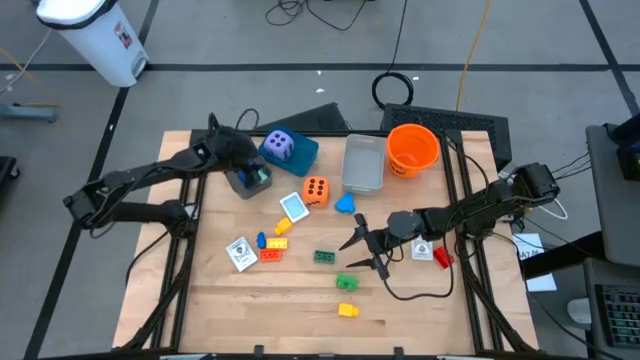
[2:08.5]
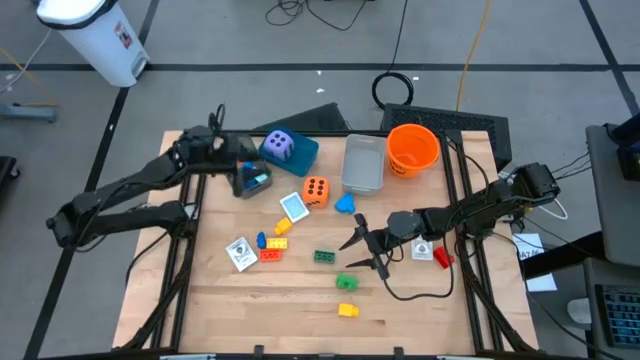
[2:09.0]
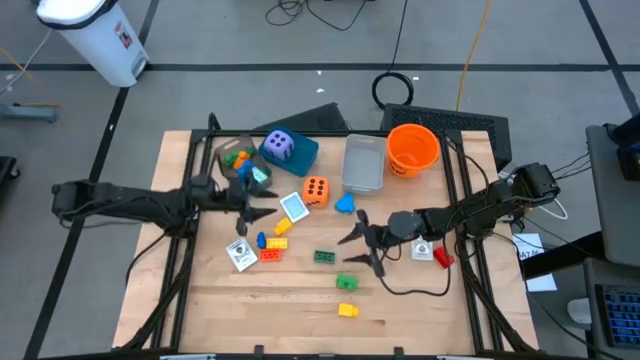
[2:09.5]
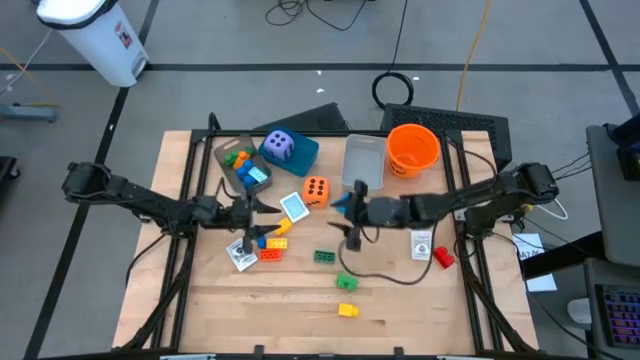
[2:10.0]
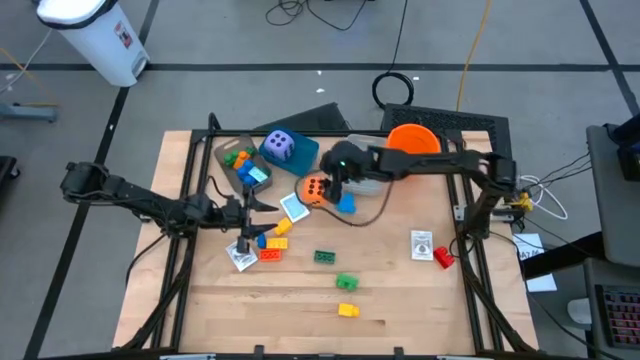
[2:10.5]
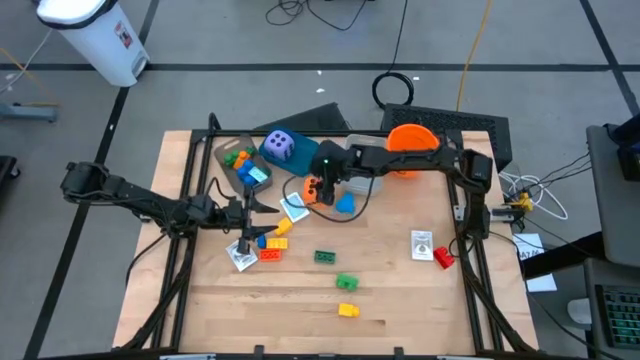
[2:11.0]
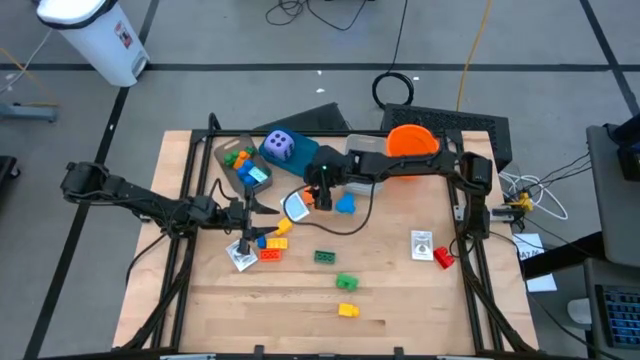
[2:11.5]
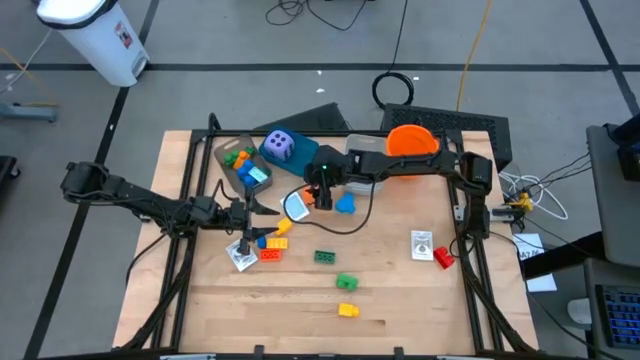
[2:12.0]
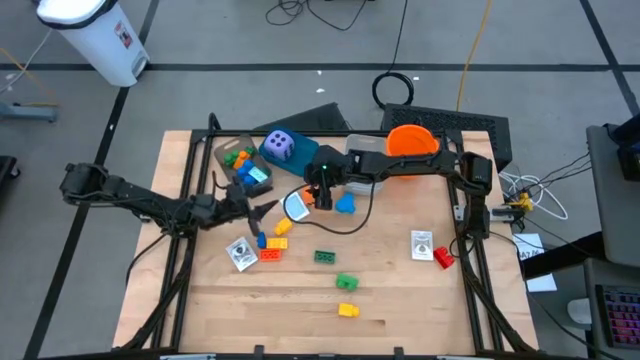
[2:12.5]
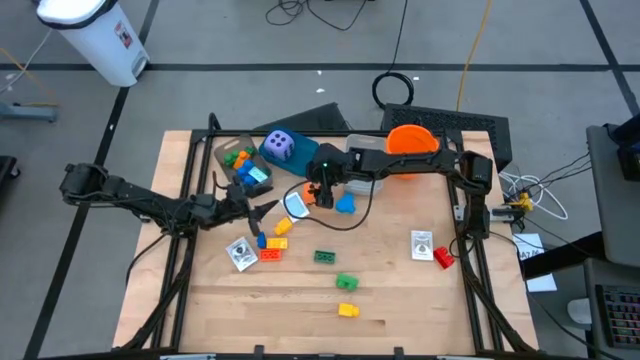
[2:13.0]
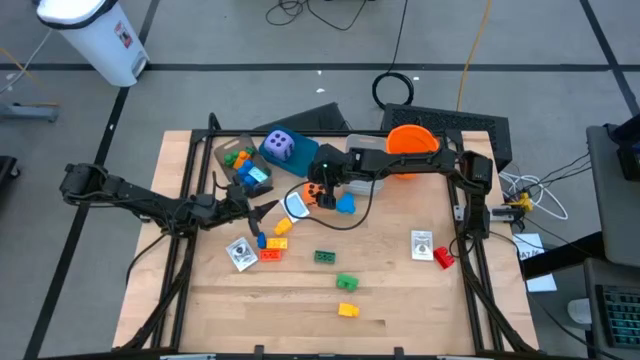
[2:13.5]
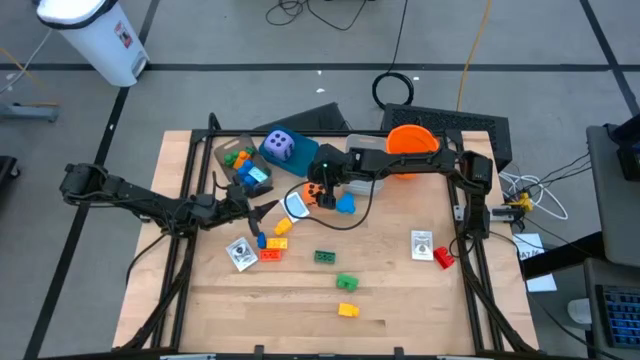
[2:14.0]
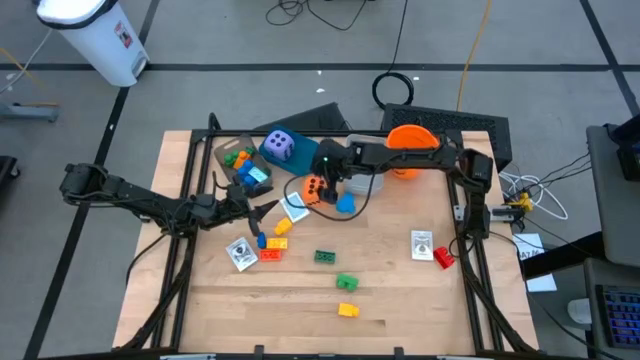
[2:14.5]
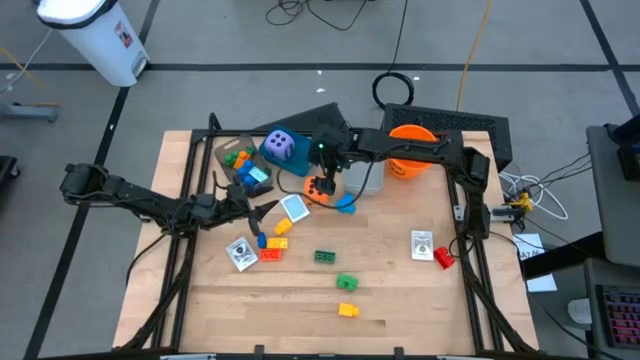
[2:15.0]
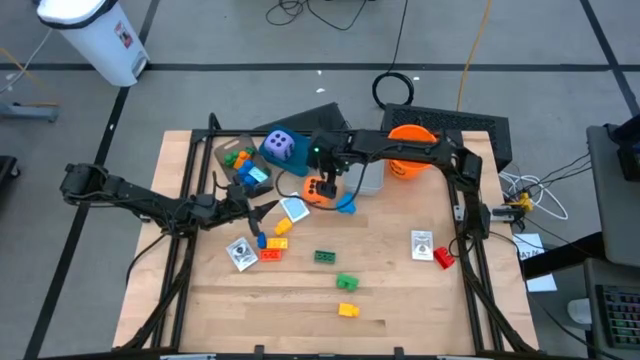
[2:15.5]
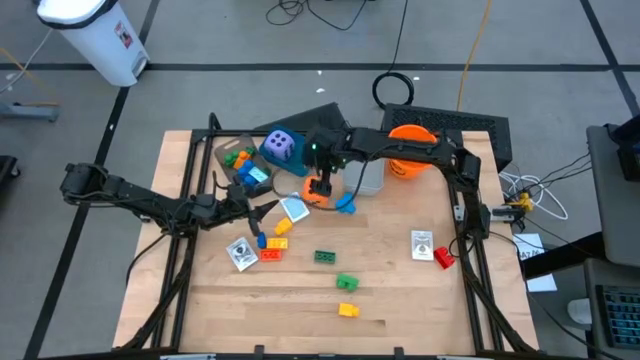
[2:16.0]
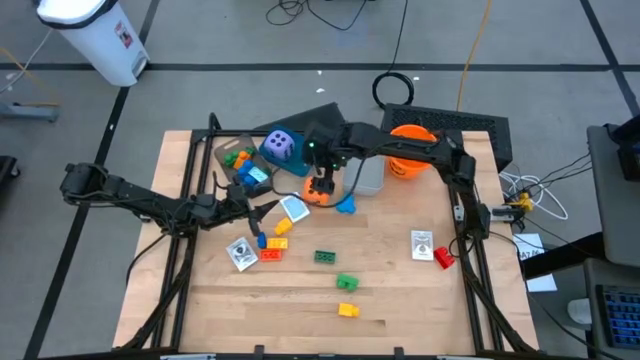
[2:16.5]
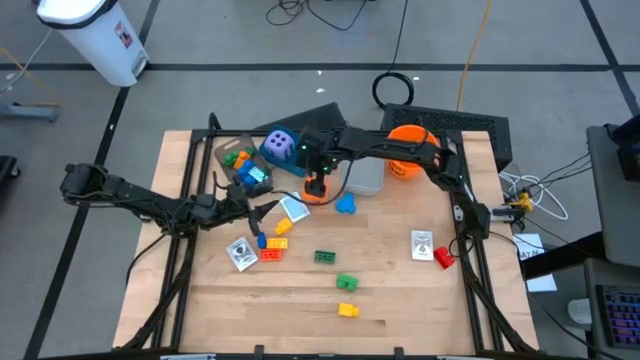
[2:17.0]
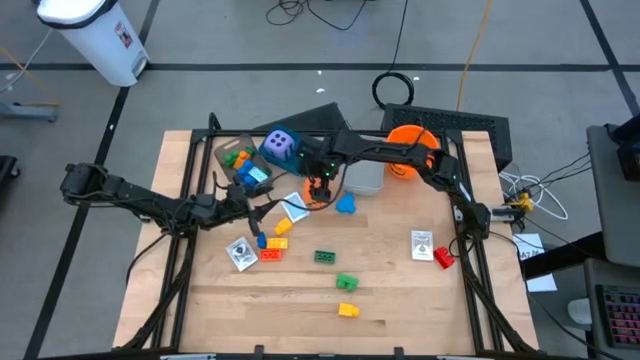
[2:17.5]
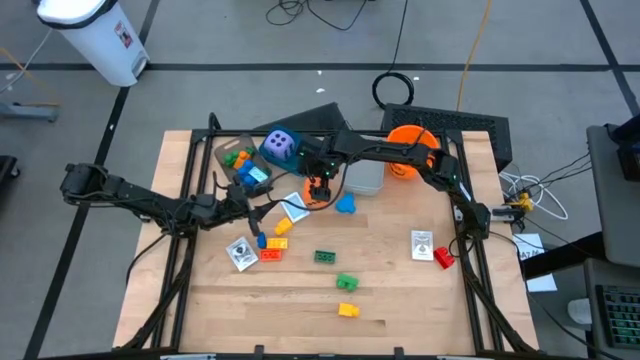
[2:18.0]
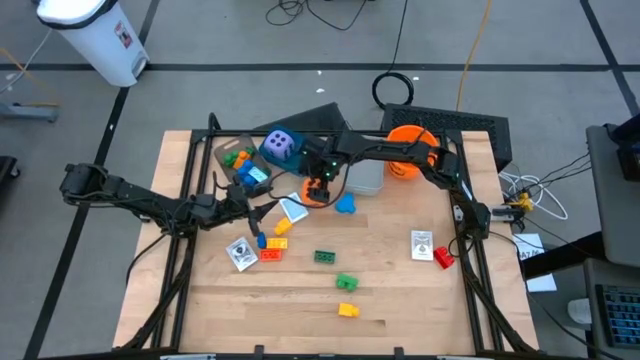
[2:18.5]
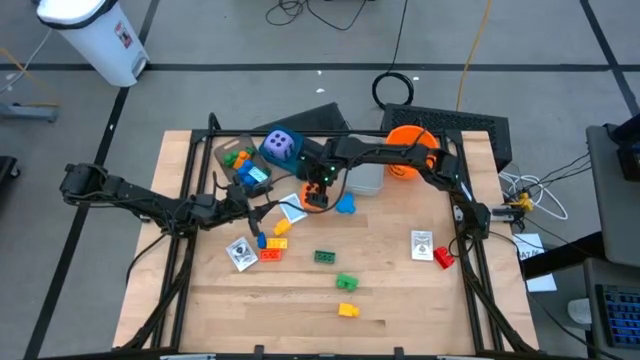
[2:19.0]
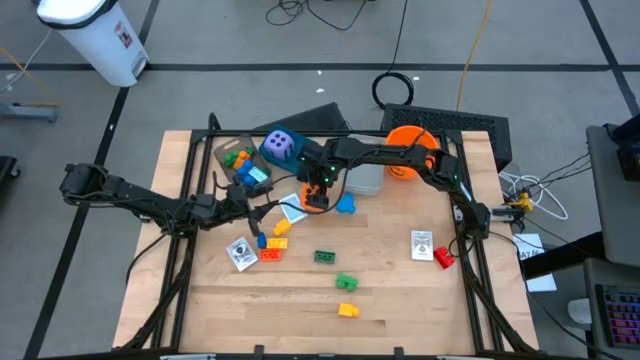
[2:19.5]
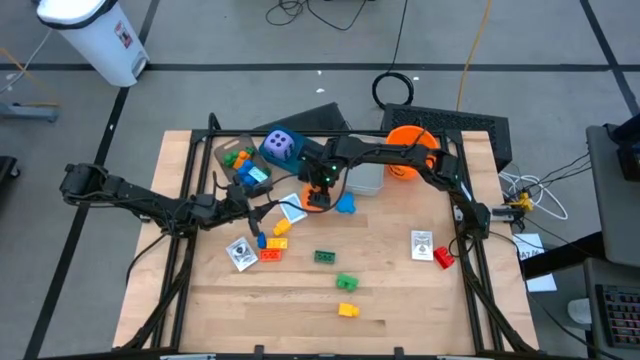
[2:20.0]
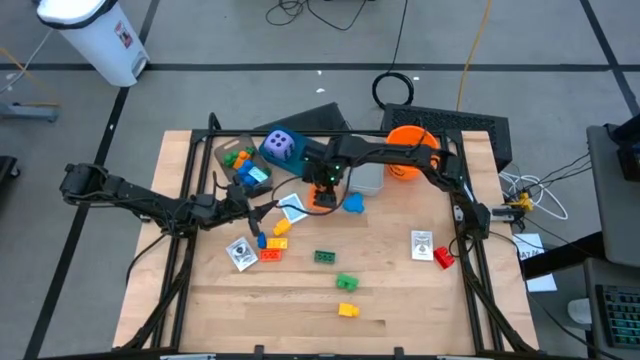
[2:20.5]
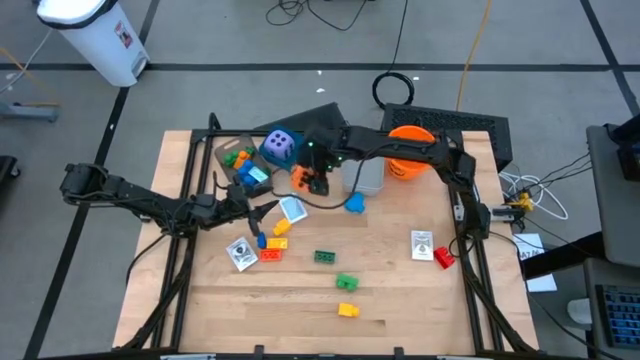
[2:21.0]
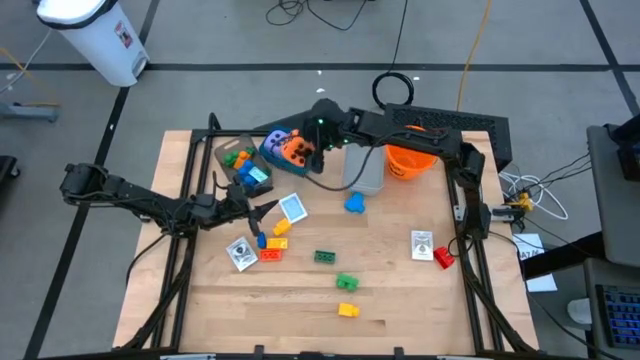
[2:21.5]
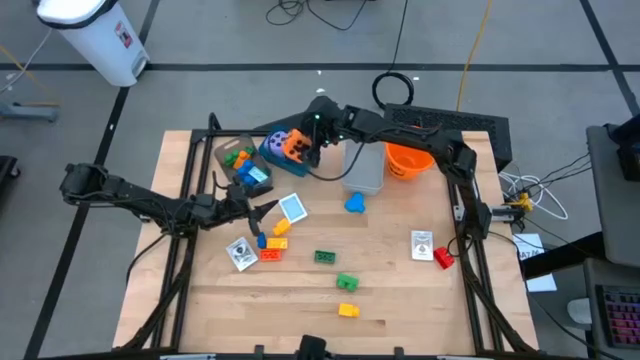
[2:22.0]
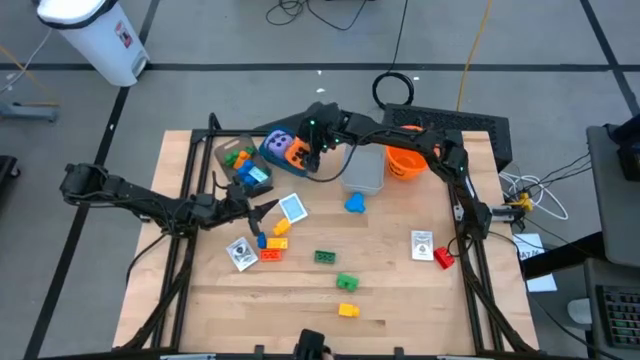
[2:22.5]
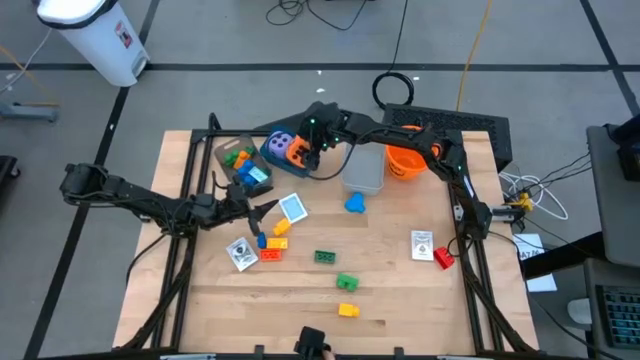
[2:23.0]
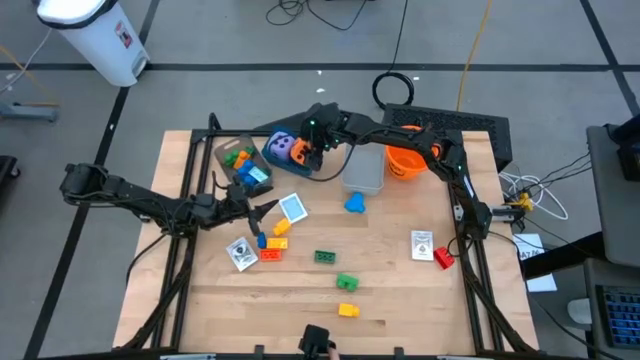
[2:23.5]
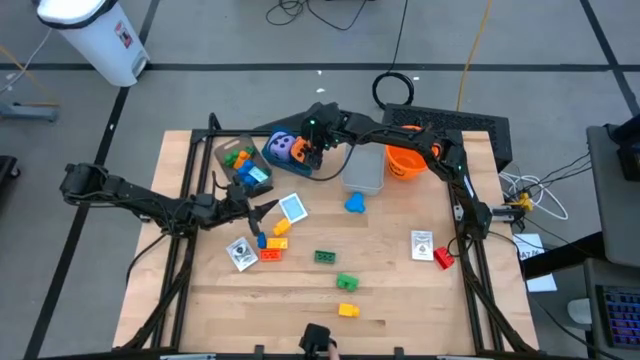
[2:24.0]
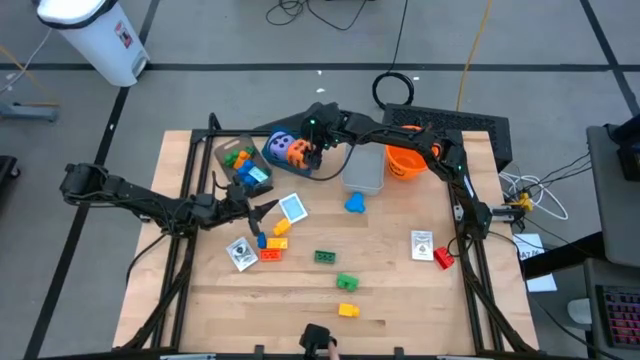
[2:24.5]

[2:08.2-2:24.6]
Task: Pick & Place Toys
Put the orange dice into the blue bin

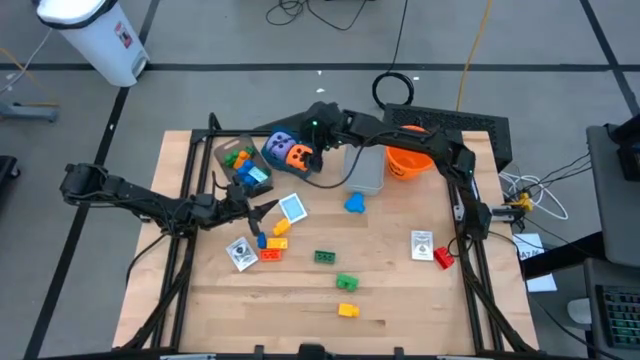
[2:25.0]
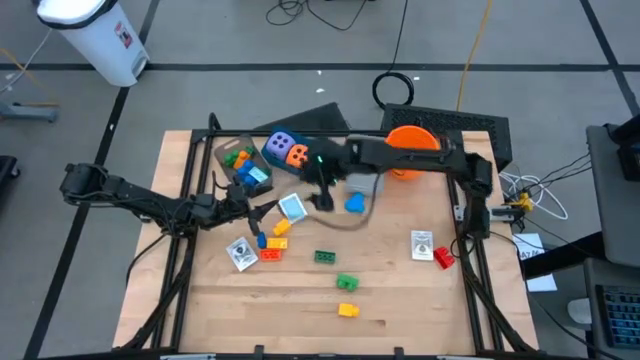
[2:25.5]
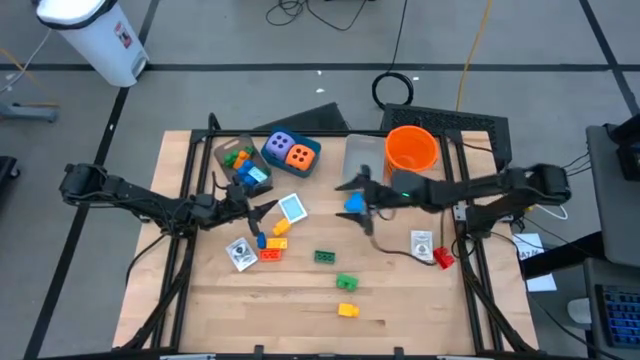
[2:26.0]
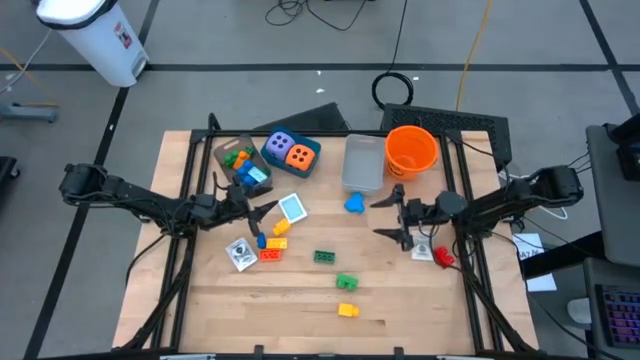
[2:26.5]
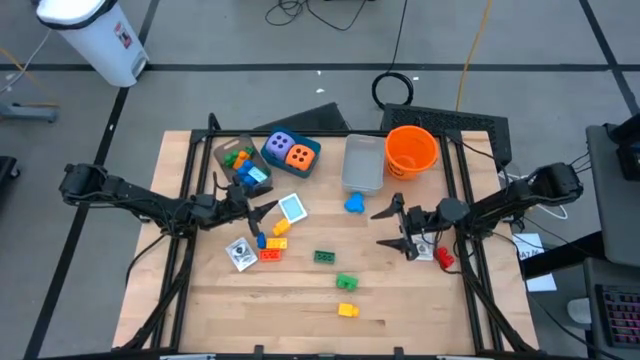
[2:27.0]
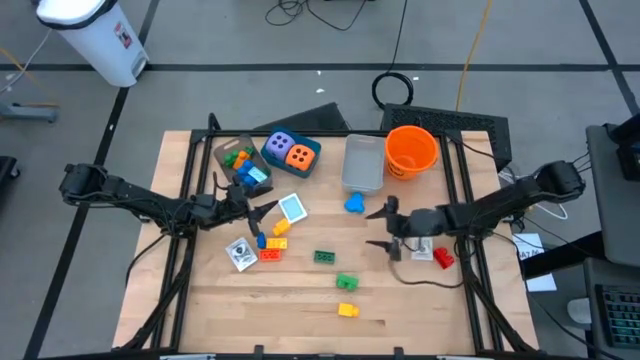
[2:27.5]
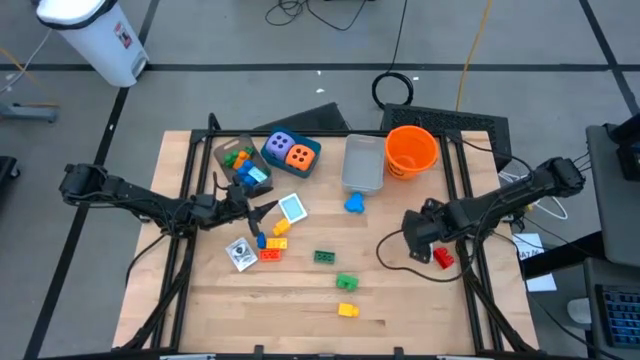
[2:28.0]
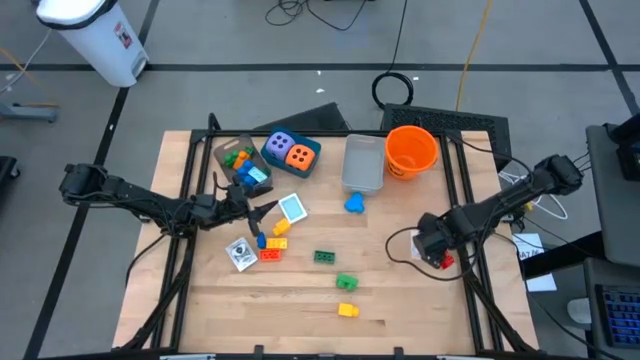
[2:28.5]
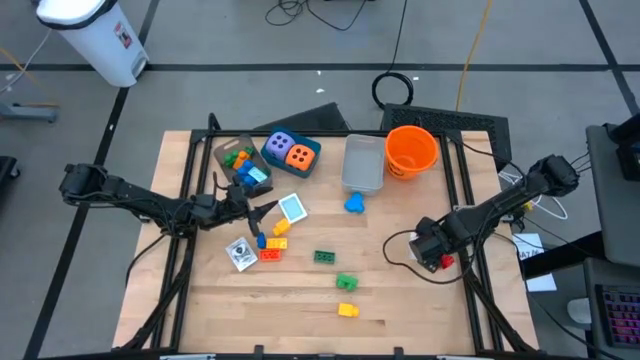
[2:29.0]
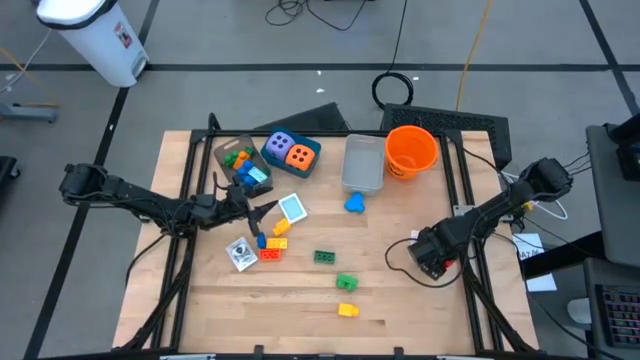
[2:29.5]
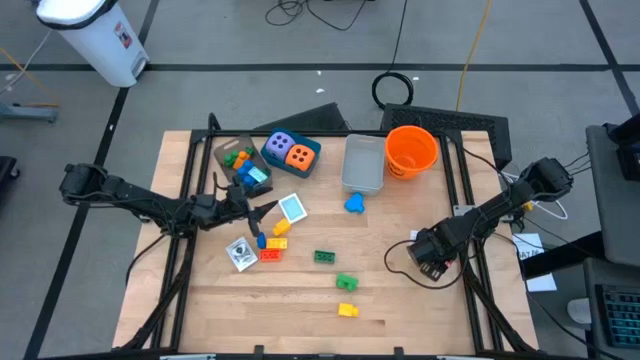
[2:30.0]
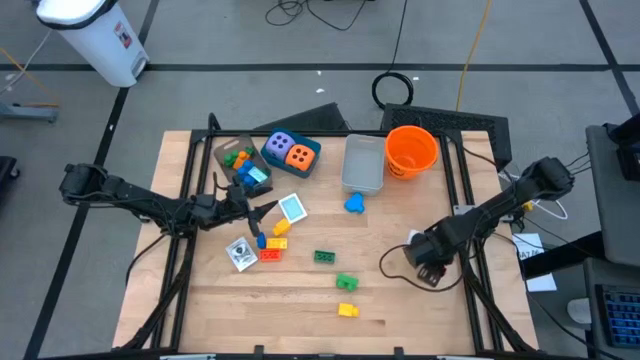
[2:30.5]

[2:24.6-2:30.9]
Put the red game piece into the black bin
